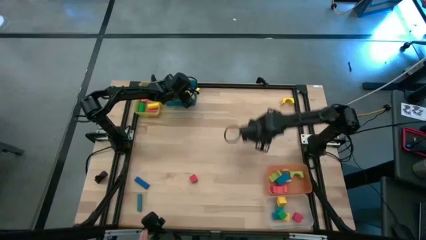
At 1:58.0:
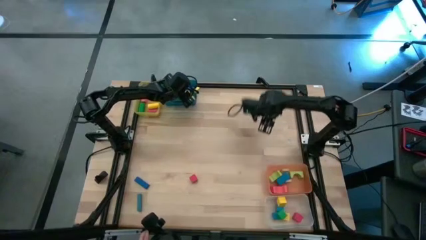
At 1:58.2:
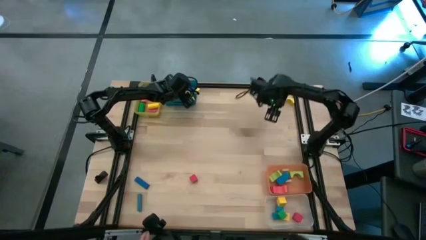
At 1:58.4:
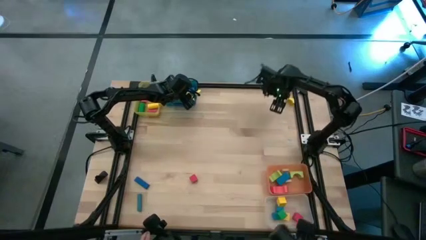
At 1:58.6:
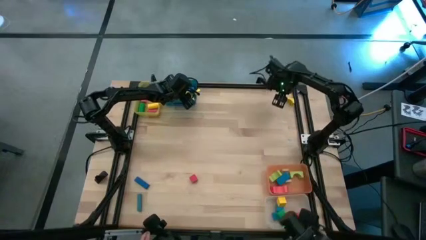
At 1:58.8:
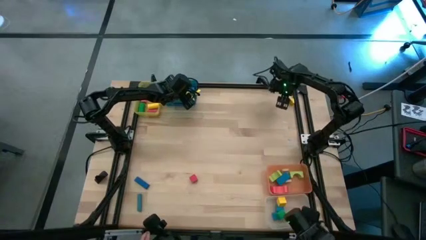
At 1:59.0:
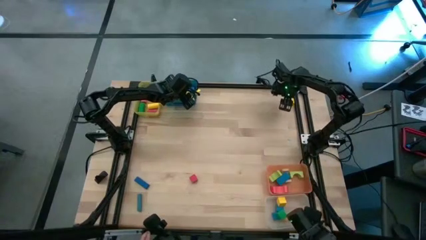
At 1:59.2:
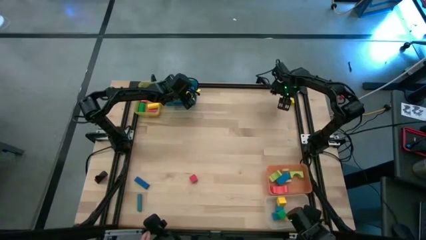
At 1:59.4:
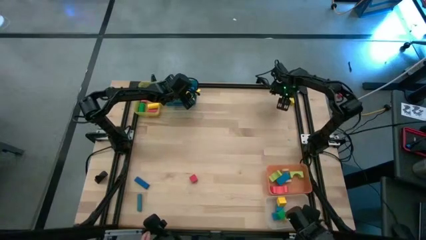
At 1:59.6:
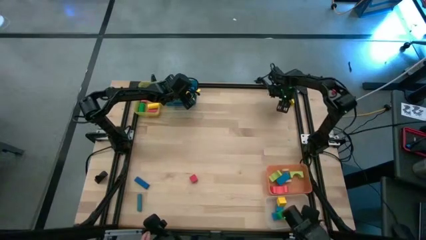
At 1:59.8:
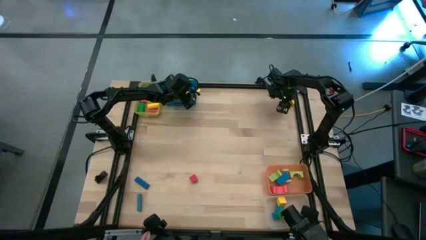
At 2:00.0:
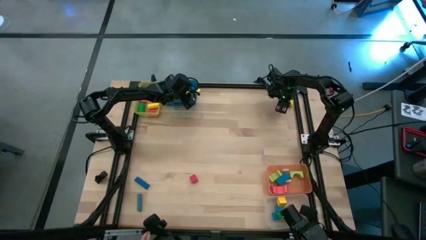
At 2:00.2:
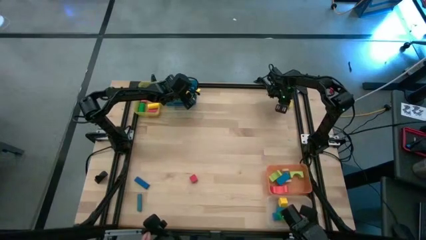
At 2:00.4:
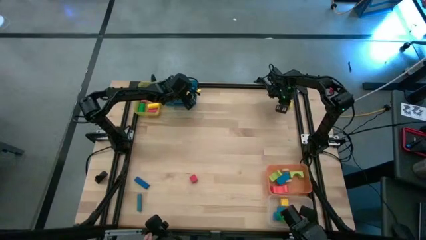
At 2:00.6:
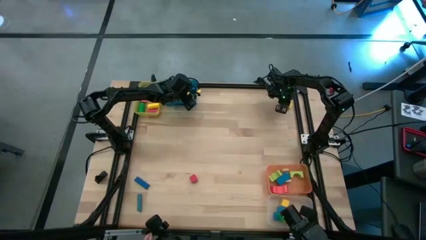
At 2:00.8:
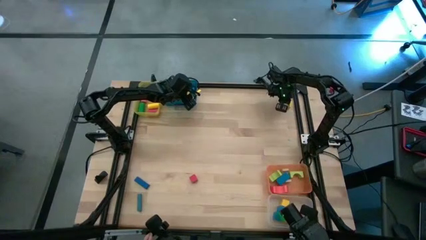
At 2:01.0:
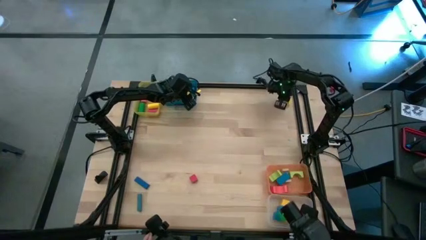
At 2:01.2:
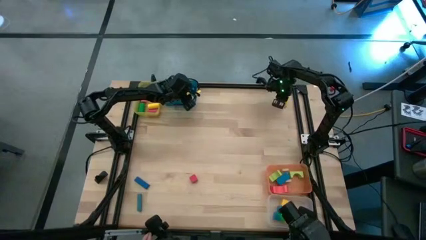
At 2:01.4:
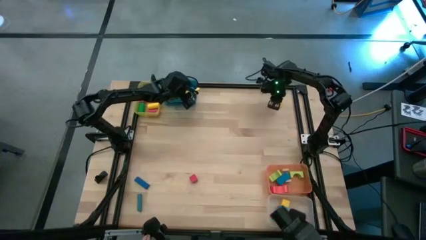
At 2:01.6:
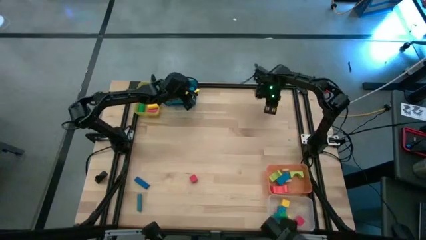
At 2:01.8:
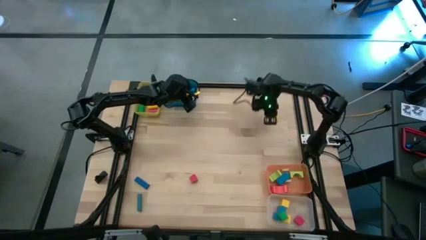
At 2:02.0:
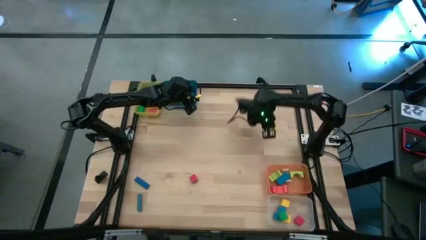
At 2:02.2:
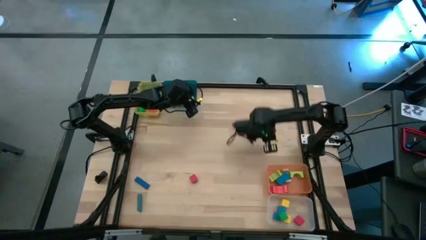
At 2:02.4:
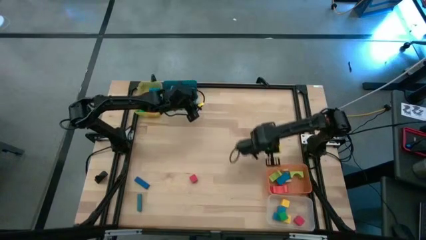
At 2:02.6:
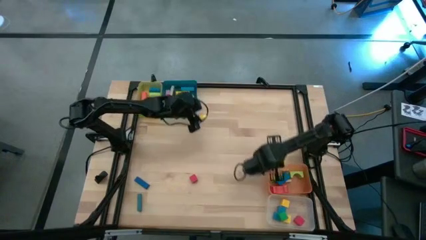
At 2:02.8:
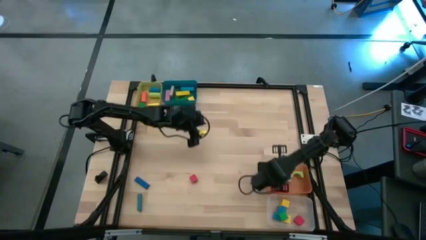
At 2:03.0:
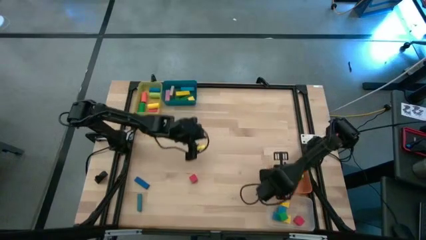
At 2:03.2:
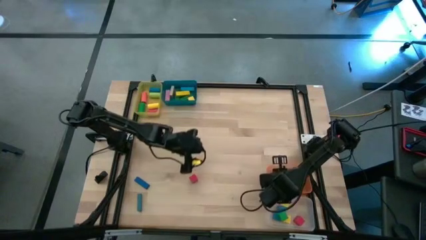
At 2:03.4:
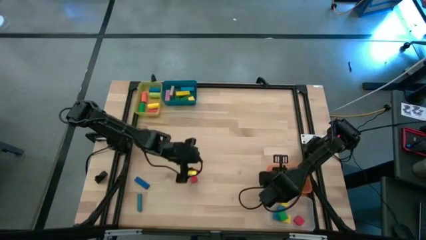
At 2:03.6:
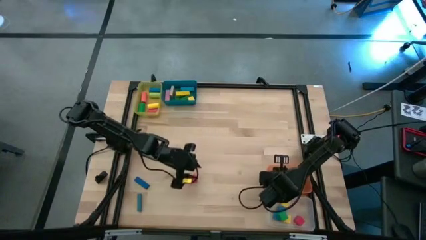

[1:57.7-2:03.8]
Task: Sort blocks by size
Put the yellow arch block into the orange bin

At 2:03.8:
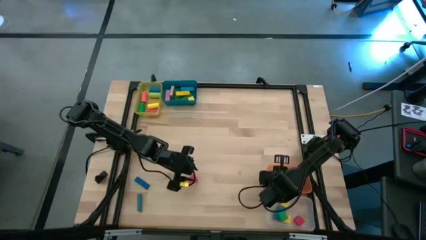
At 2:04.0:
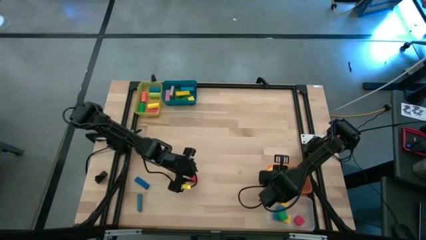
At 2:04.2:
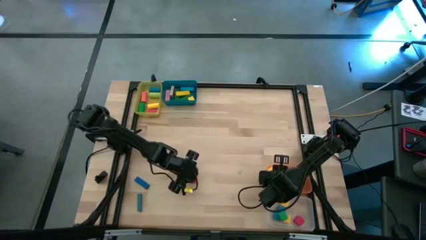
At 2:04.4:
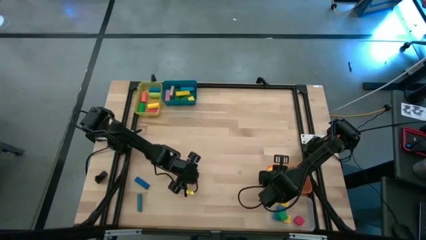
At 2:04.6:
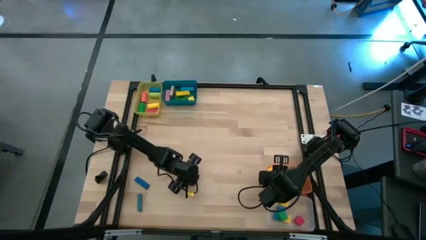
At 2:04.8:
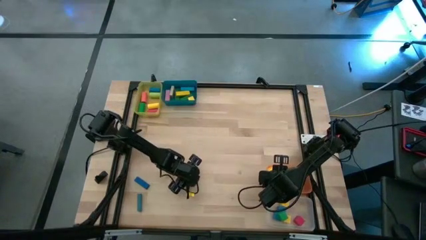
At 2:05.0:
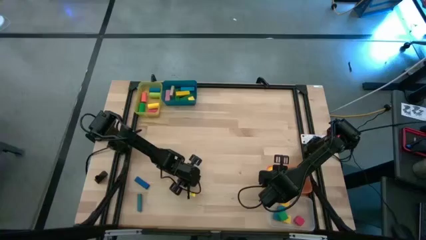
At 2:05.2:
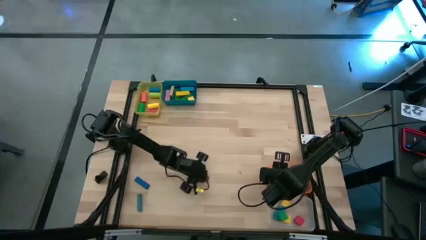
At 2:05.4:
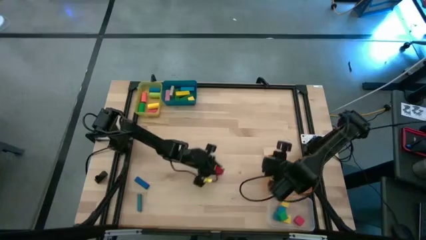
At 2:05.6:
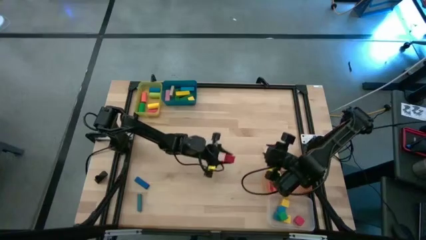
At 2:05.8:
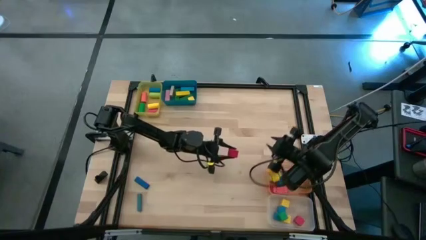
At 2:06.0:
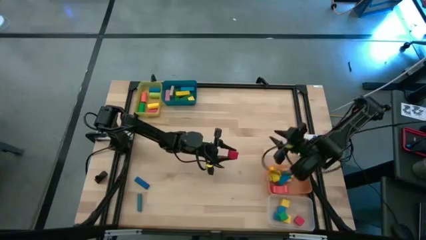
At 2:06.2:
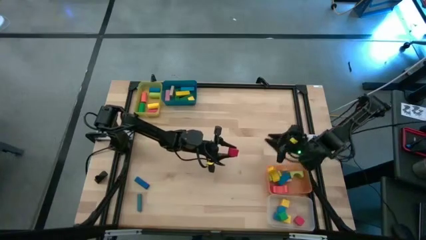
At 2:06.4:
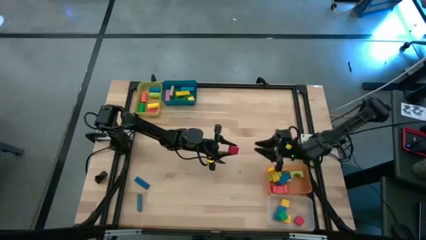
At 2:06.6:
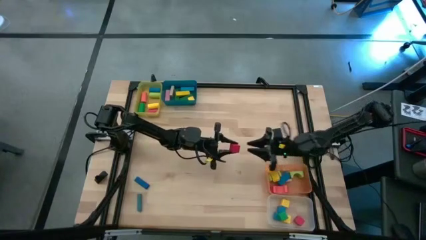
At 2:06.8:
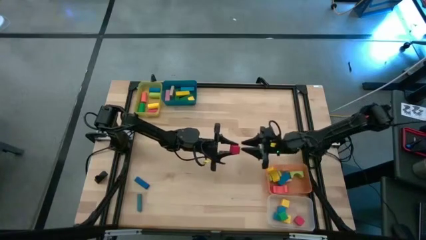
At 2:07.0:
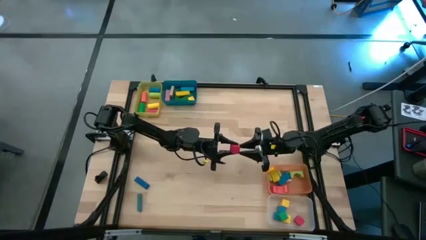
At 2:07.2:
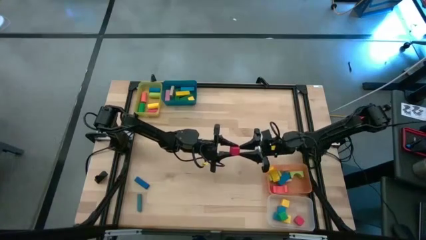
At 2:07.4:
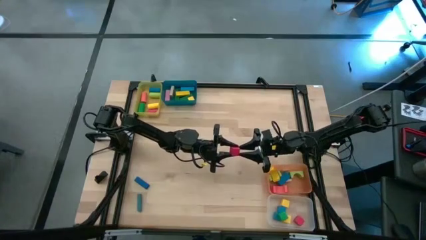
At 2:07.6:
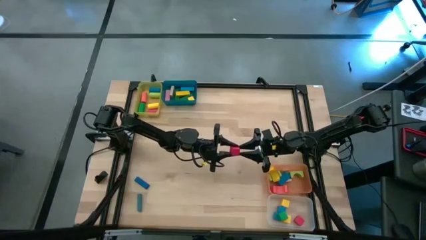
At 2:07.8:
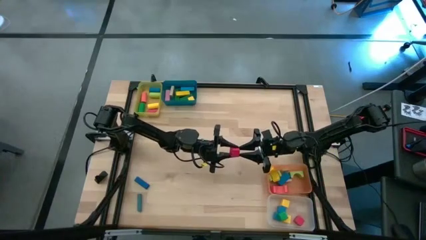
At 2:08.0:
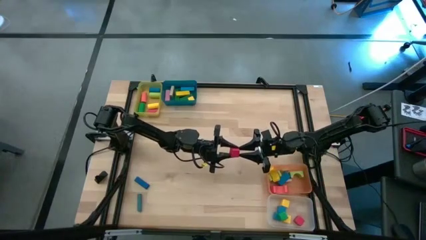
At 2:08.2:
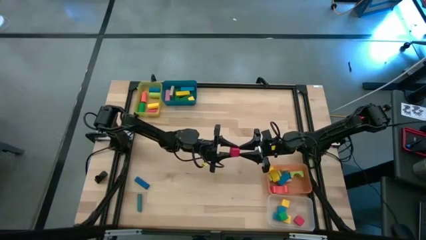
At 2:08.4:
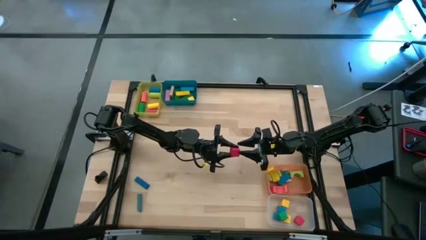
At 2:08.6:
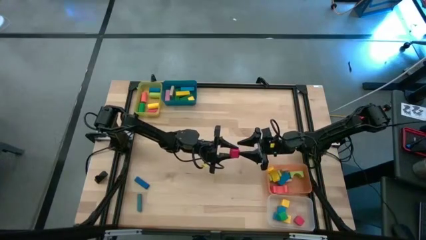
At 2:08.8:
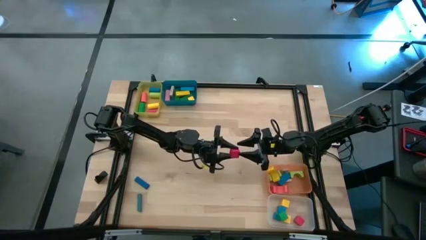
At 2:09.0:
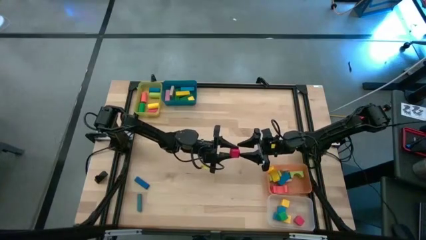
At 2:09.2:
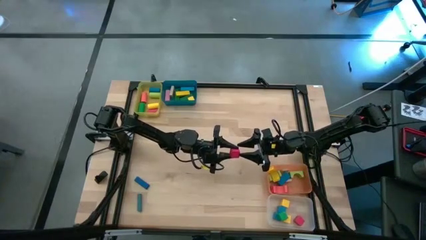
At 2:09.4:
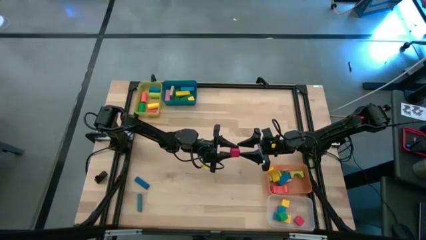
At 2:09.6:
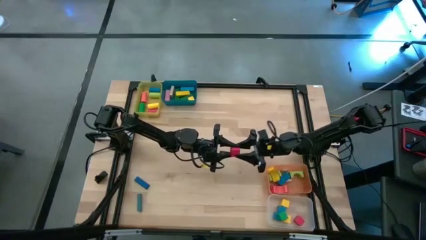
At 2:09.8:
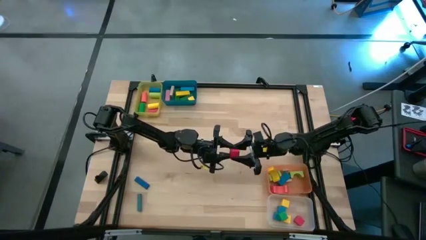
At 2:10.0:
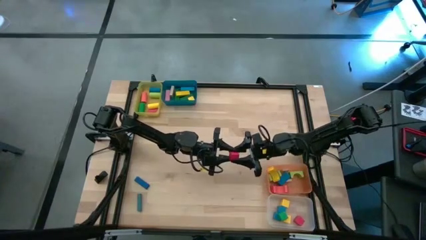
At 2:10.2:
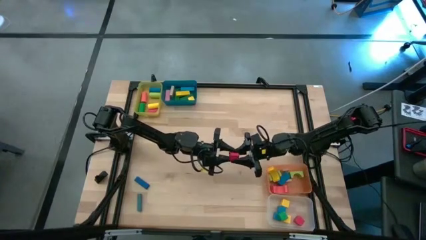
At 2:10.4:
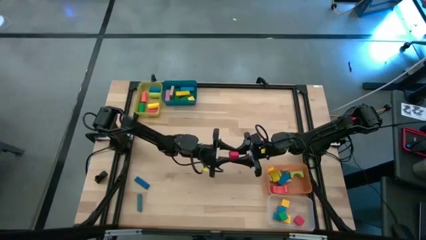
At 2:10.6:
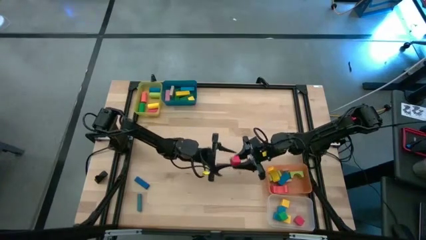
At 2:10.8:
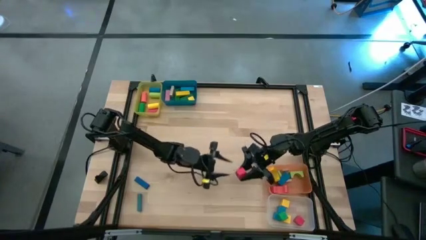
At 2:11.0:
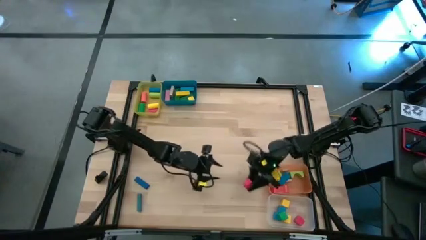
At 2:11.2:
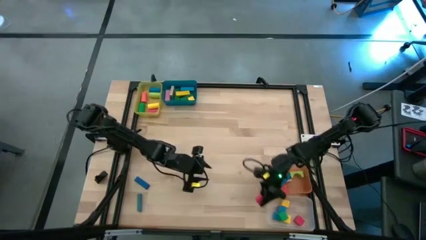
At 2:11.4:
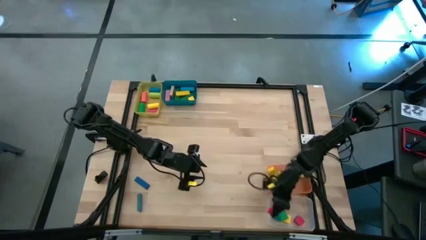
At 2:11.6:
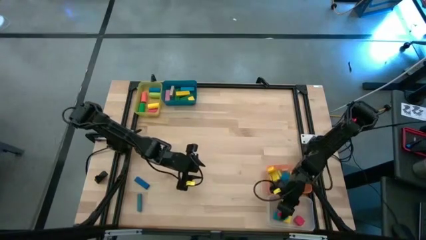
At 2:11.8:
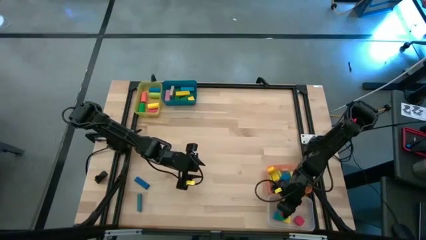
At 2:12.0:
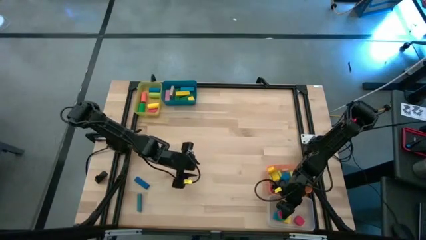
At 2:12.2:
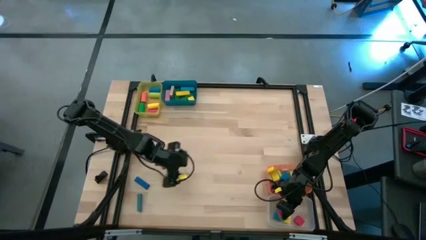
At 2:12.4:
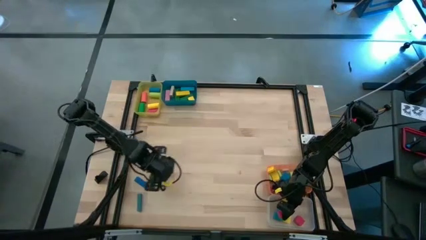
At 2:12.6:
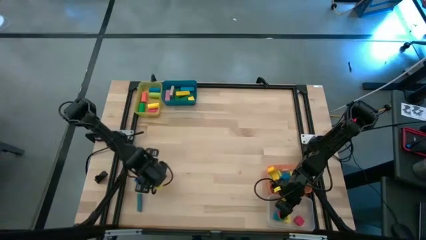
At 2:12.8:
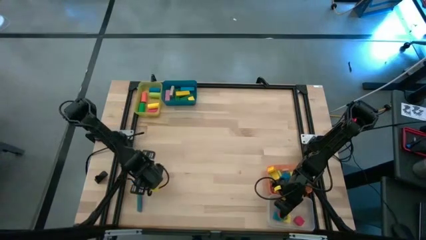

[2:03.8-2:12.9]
Put the red square block into the transparent bin

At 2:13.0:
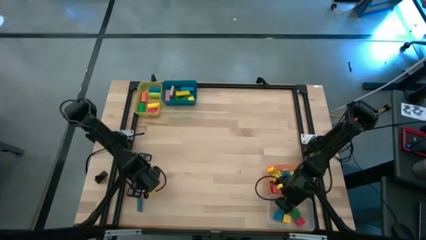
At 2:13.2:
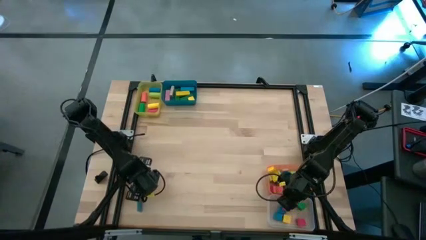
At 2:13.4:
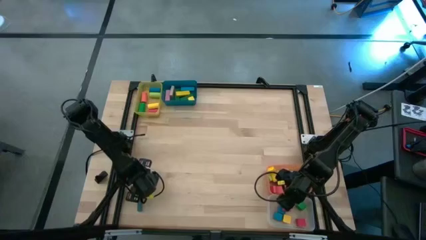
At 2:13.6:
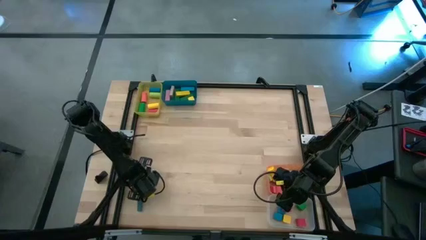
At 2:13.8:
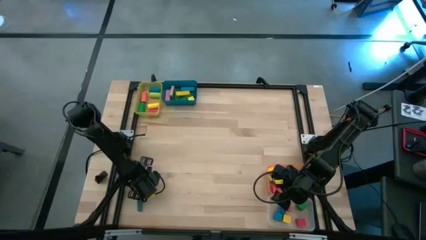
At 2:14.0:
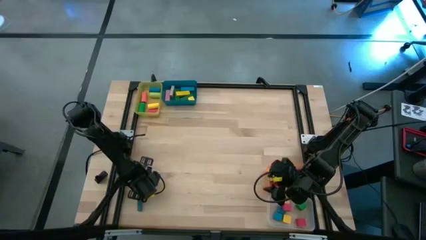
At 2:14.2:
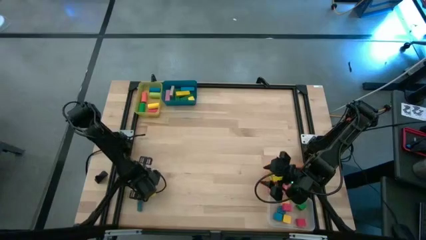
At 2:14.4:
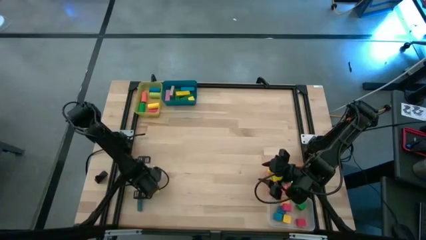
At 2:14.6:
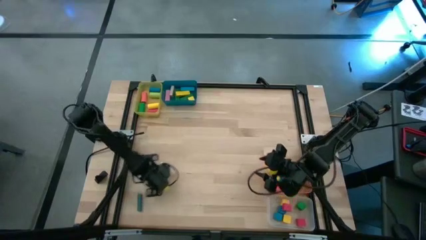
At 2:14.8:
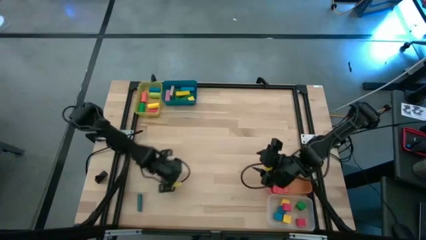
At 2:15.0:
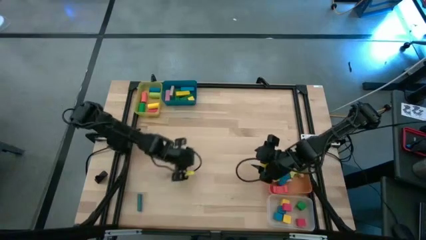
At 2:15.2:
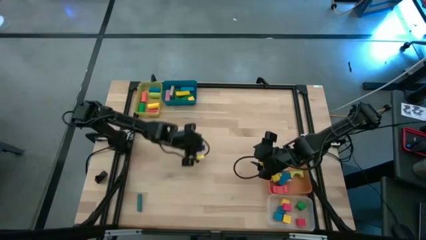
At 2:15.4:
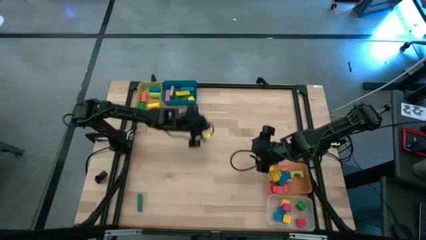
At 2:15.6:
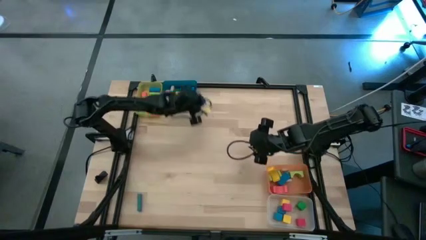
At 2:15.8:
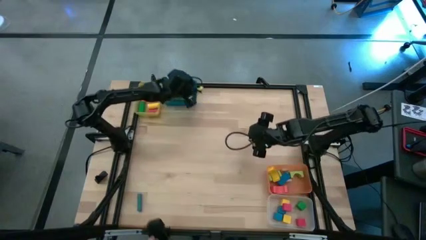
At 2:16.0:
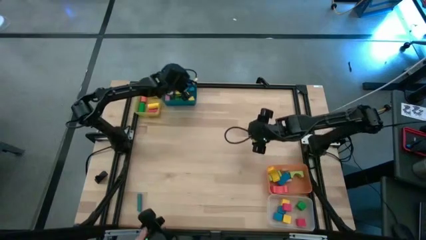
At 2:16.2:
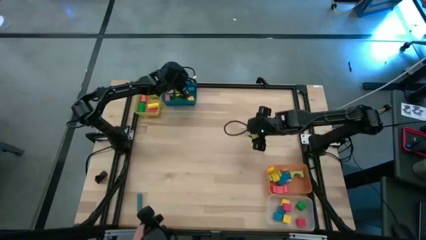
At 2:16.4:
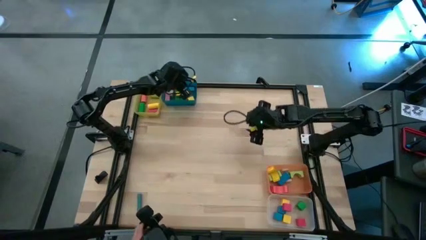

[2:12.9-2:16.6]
Put the blue rectangular block into the blue bin
